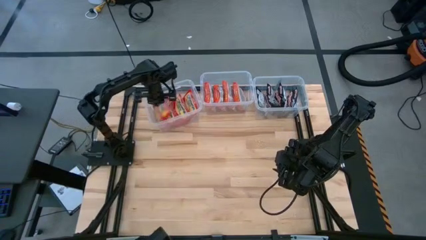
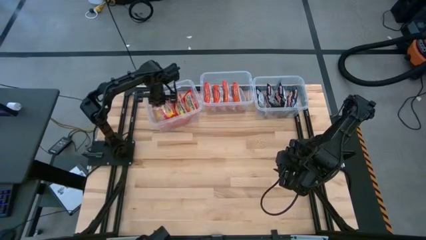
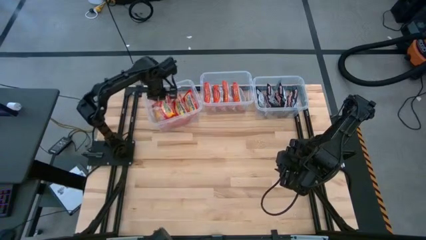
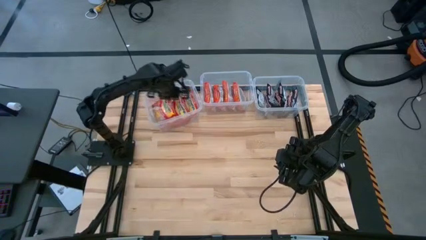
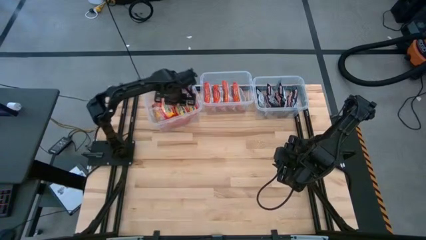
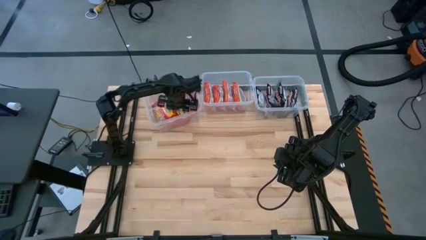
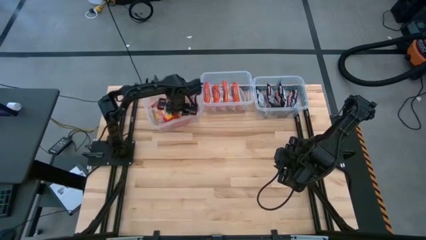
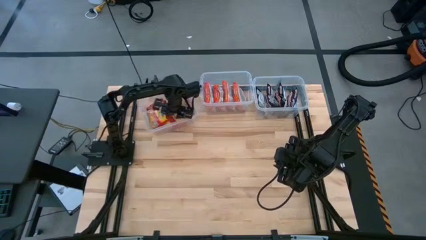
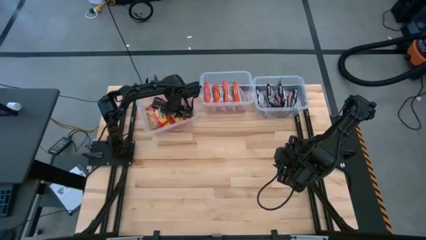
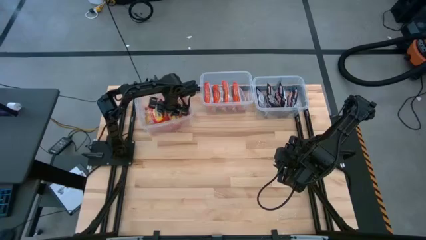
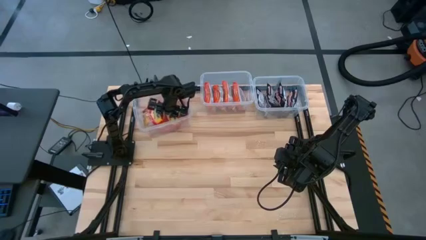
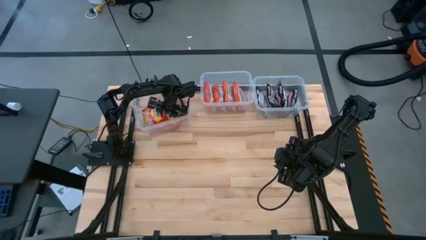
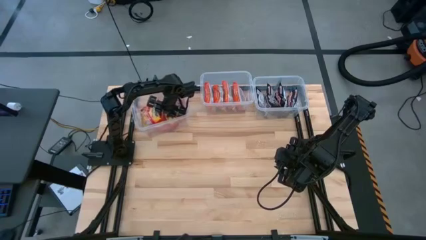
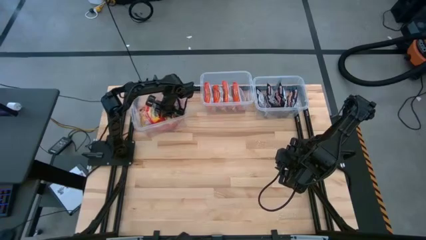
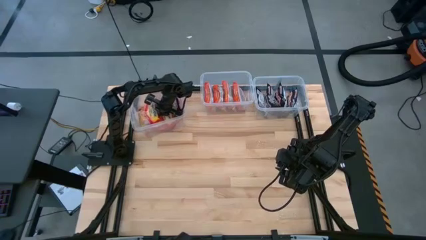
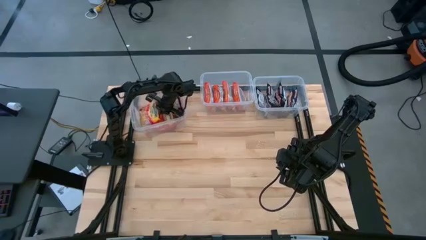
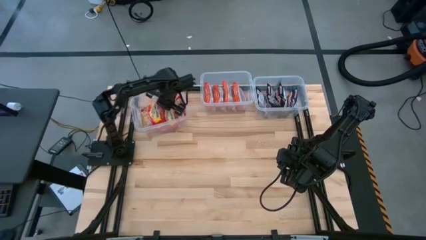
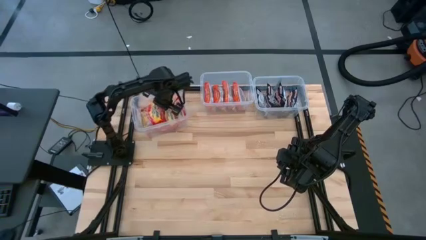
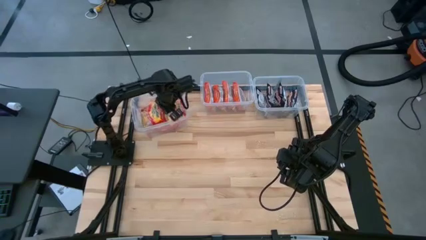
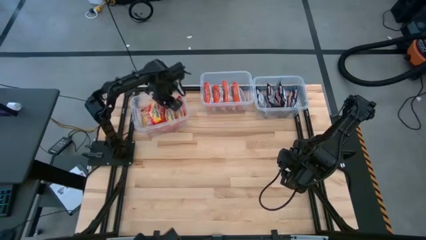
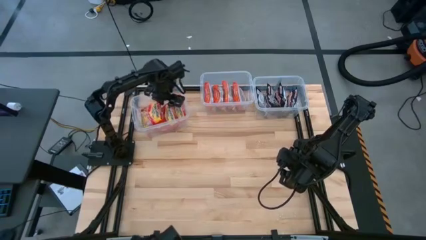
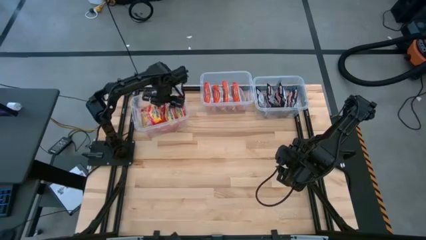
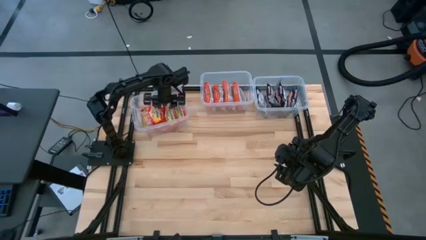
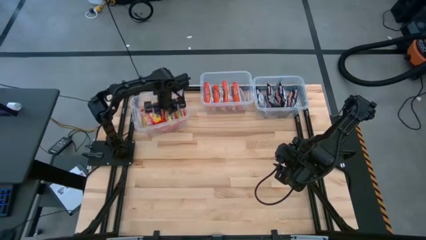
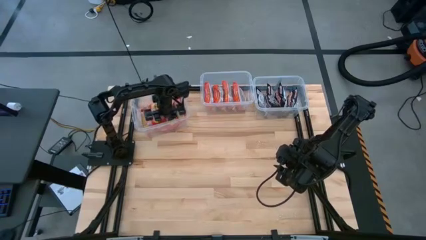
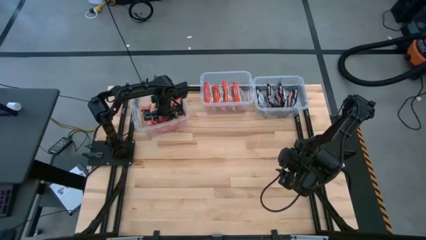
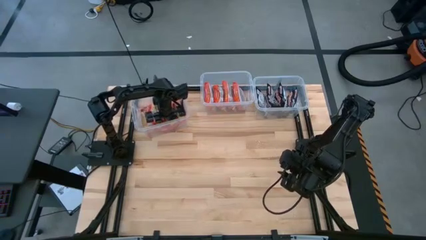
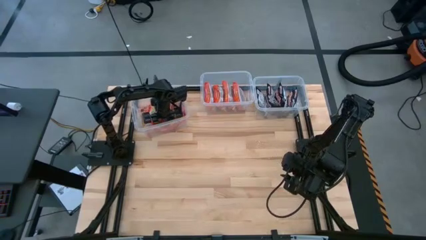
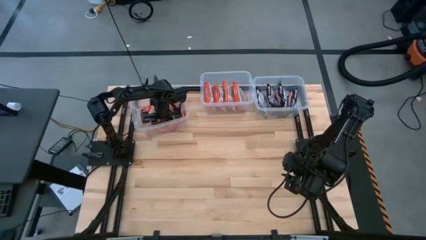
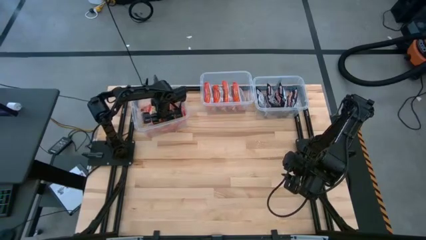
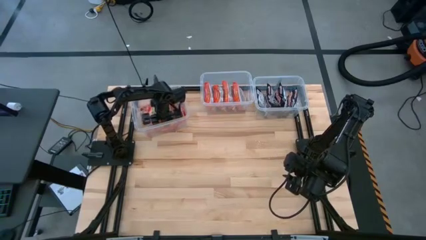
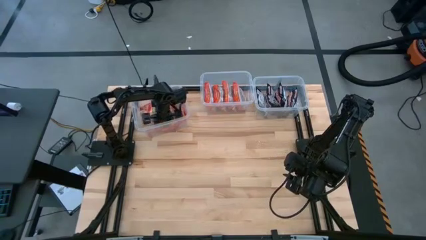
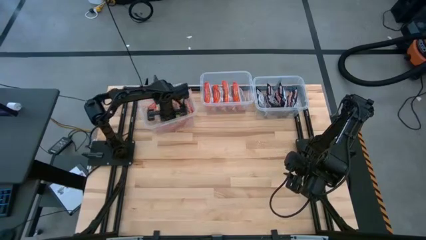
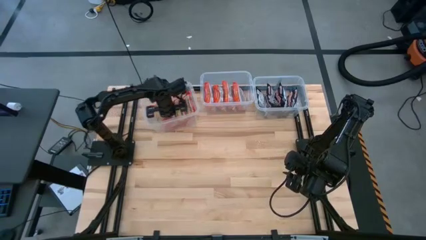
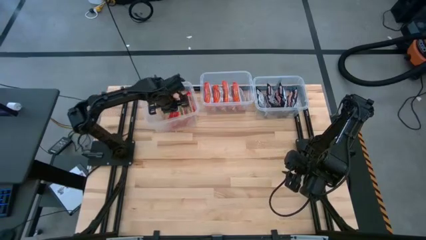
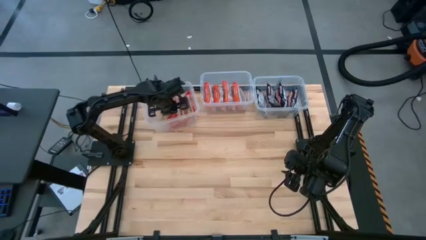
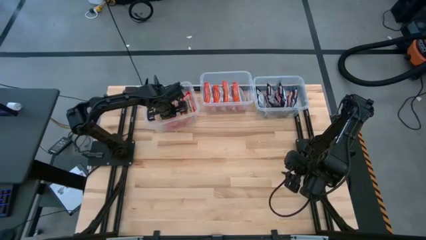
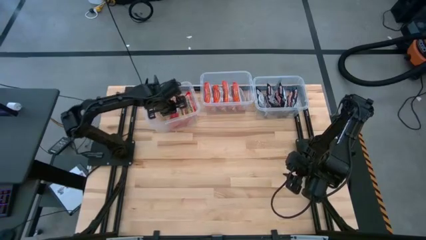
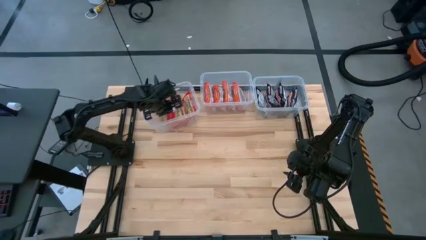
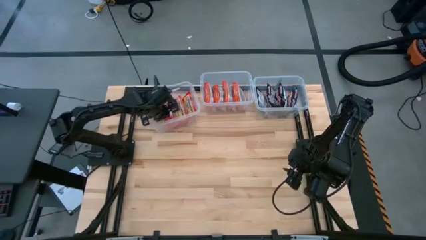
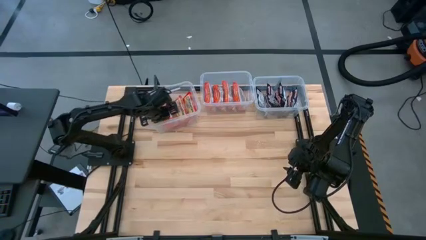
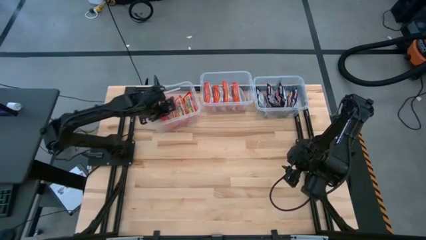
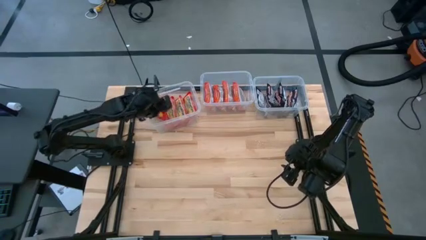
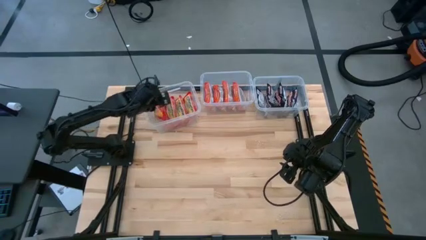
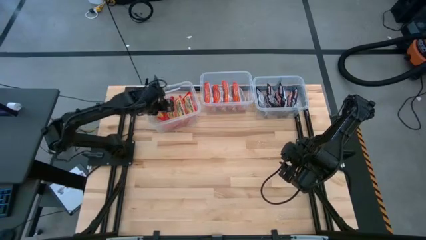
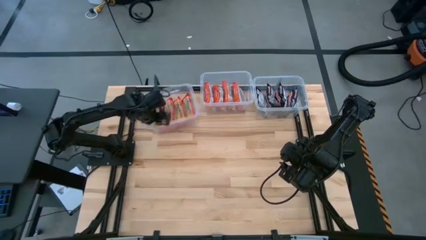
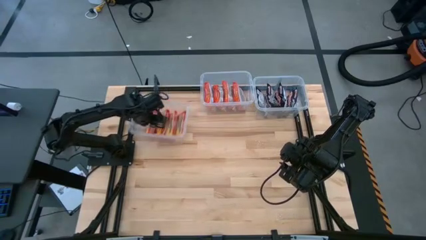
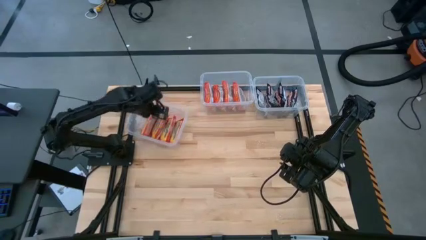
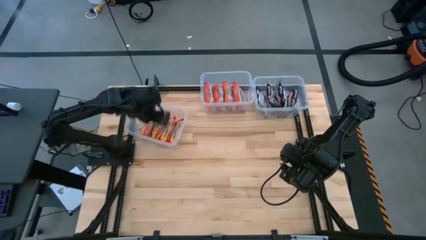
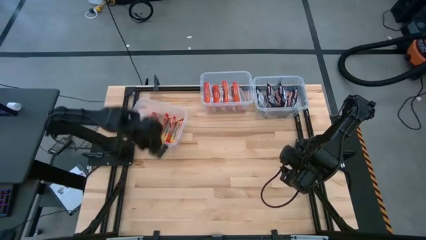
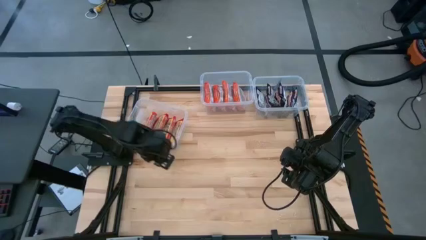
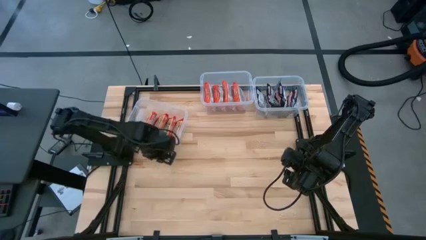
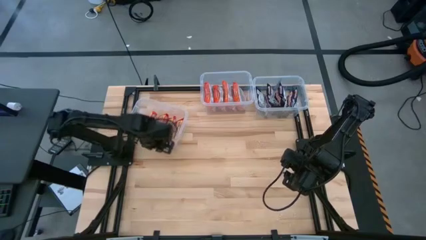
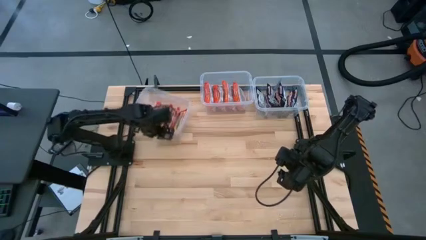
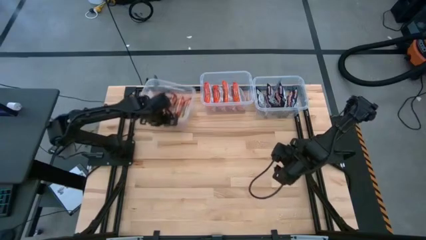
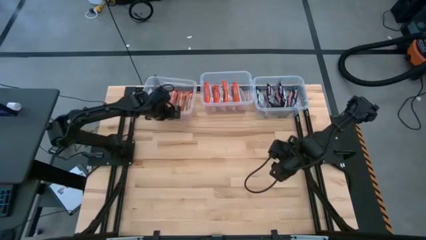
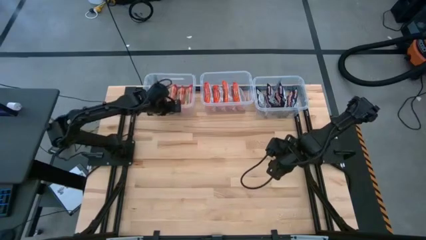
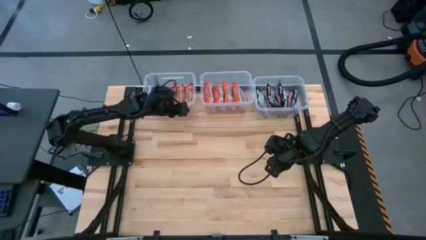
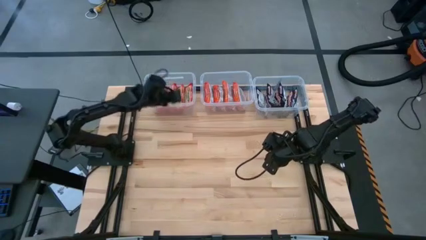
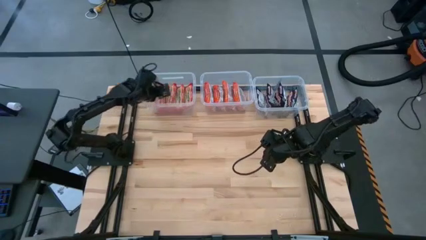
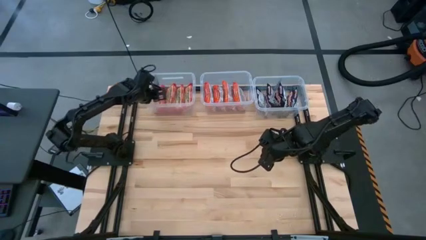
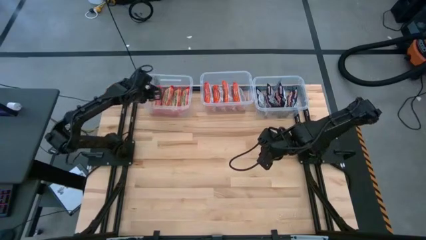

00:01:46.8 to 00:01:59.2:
Task: Sort Maruchan noodles
Adjust the top left transparent bin

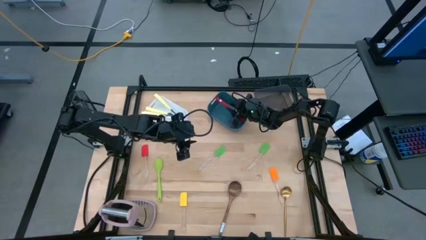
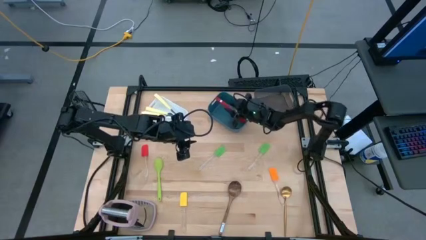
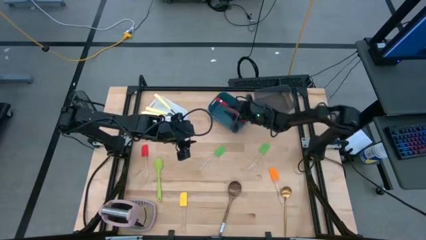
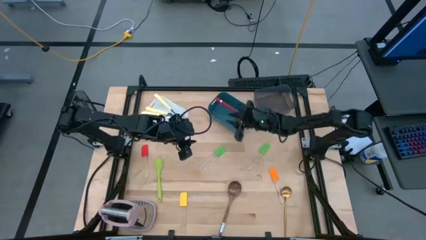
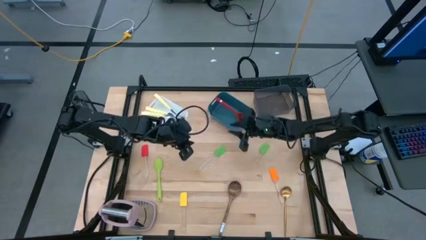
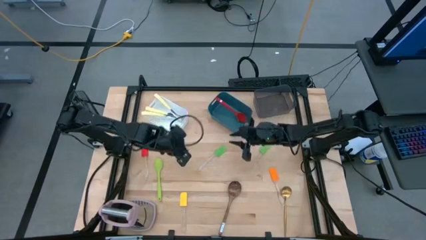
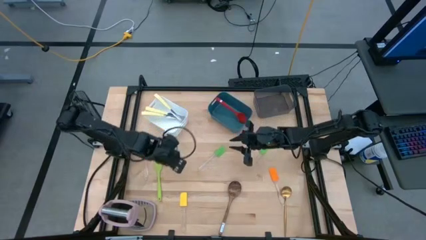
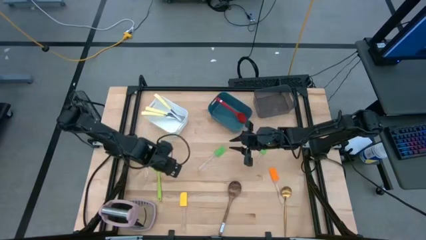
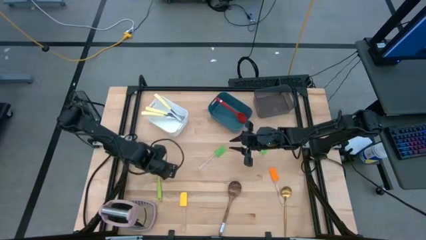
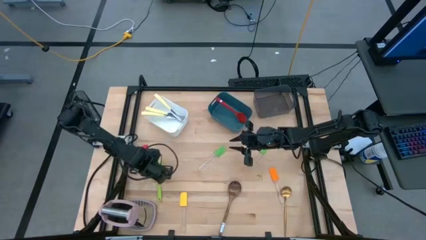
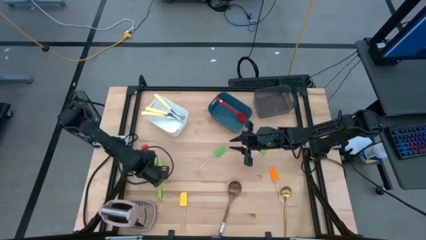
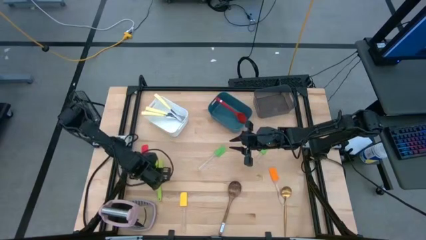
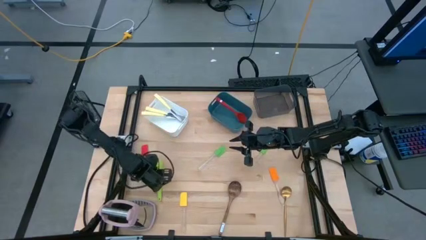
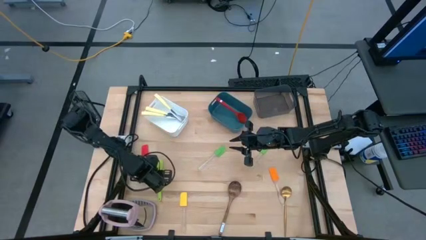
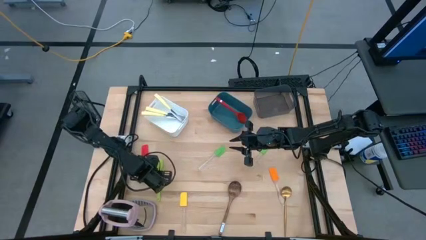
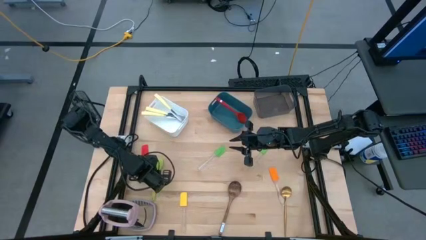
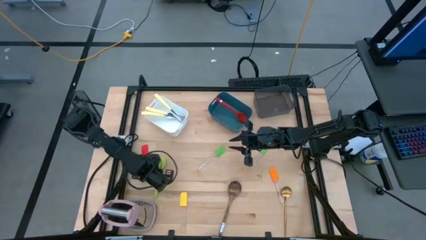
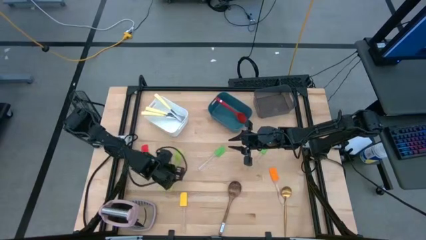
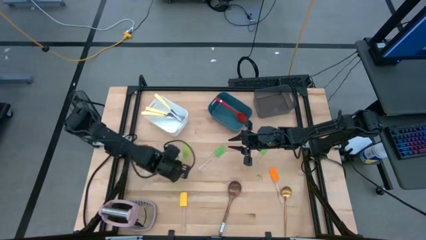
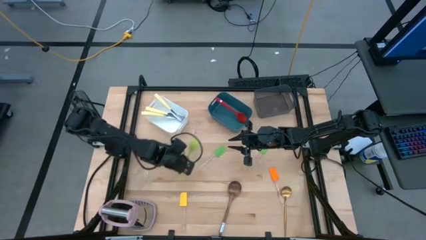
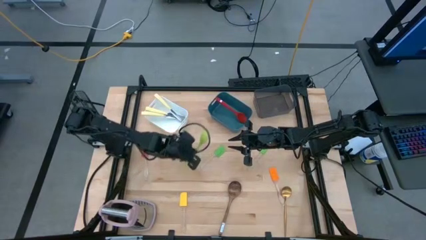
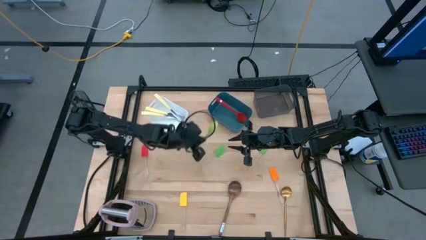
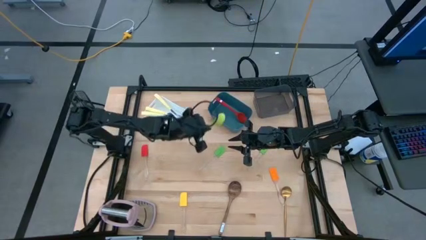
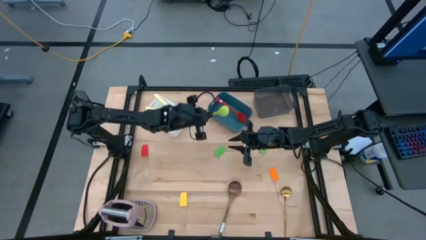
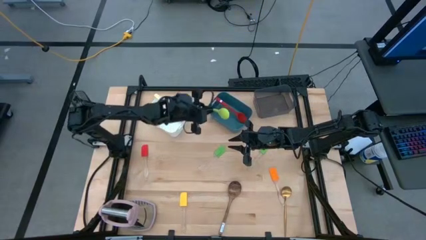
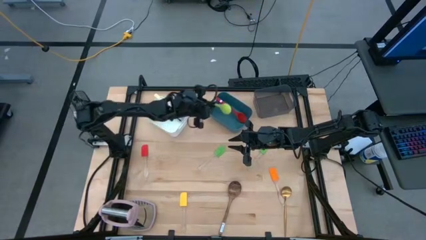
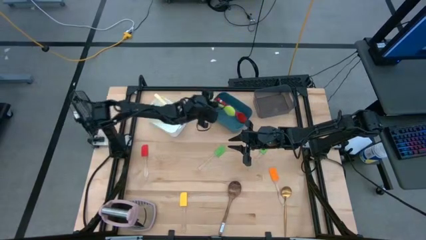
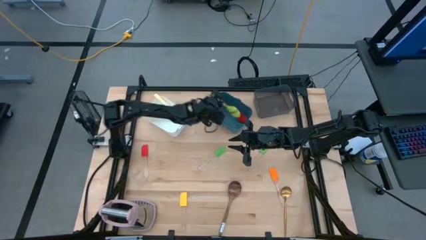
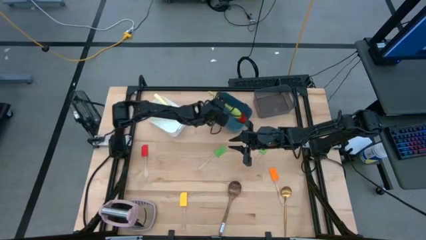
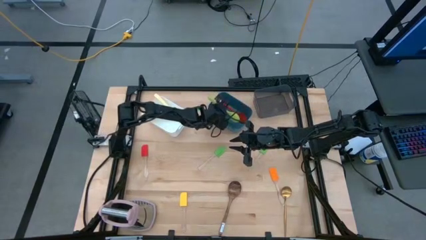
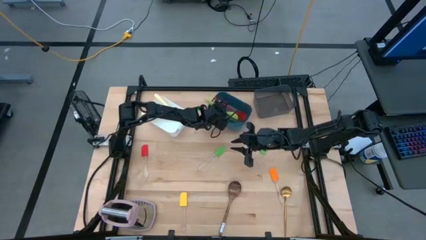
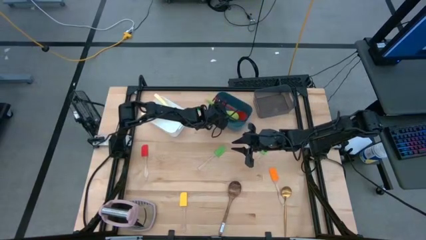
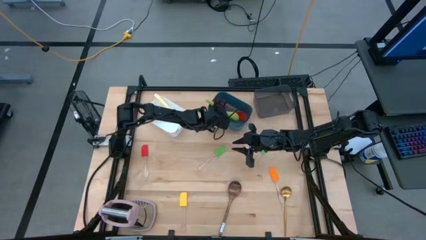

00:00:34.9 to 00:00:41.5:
Task: Pick & Place Kitchen Items
Put the light green serving spoon into the blue bin
